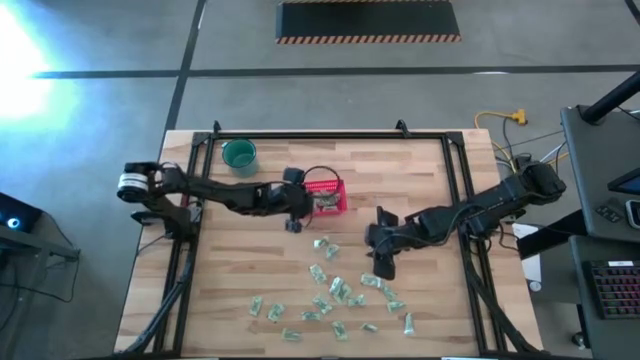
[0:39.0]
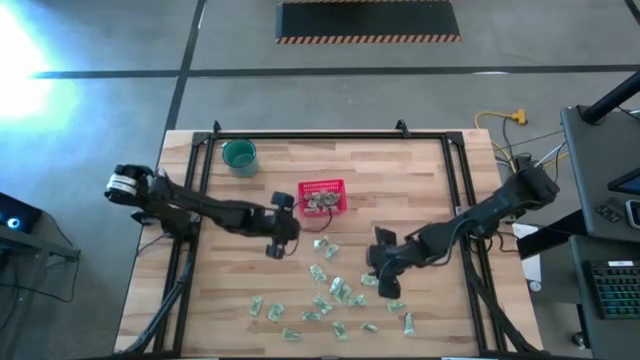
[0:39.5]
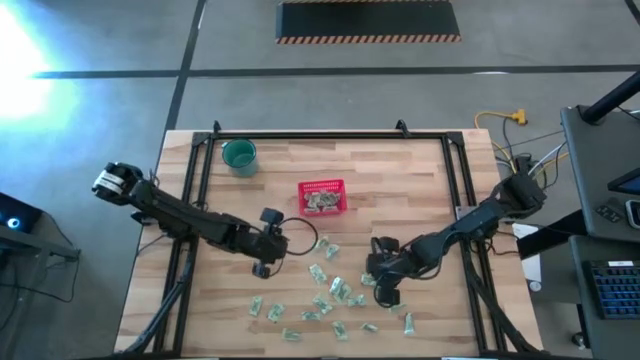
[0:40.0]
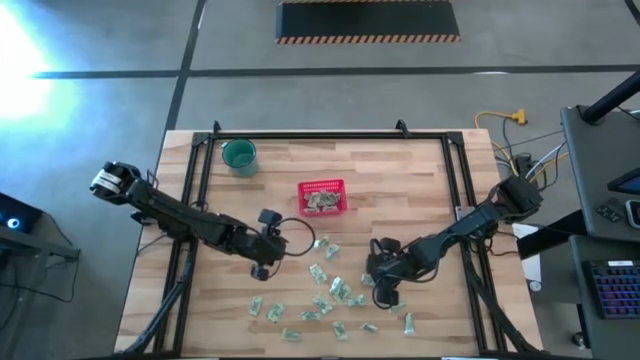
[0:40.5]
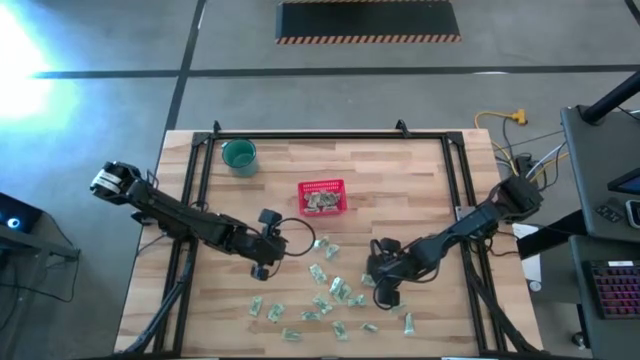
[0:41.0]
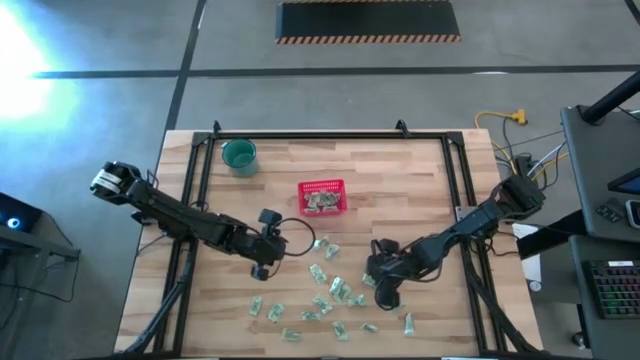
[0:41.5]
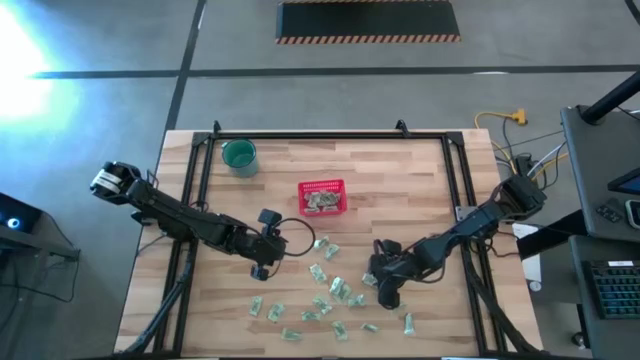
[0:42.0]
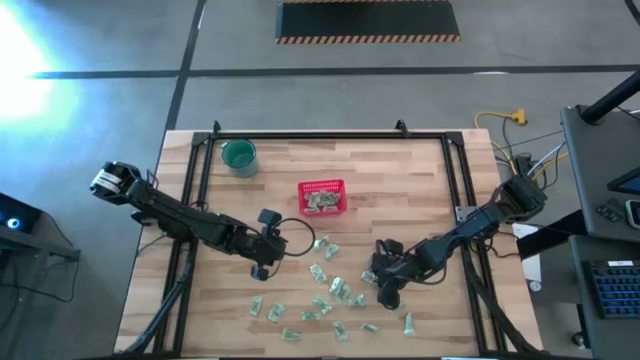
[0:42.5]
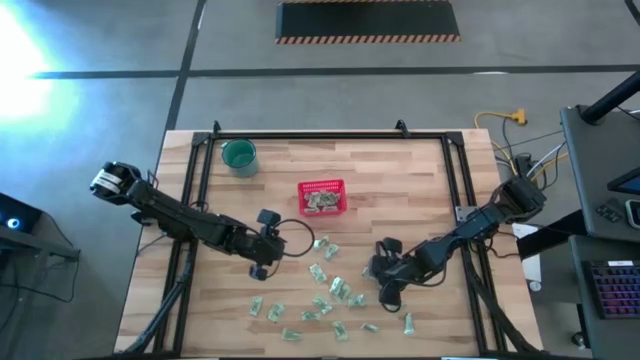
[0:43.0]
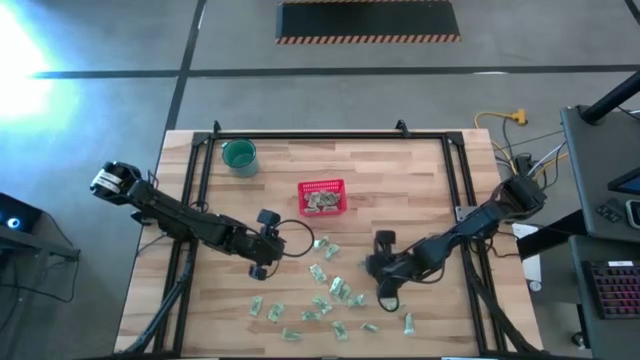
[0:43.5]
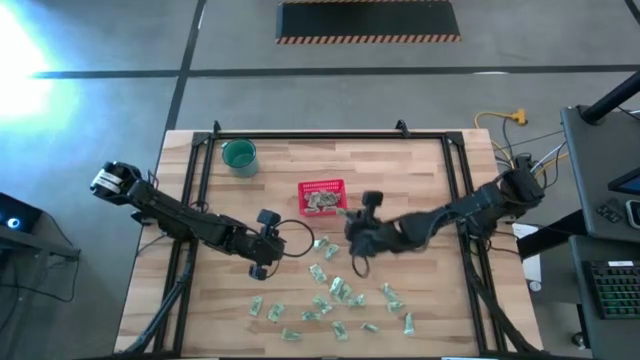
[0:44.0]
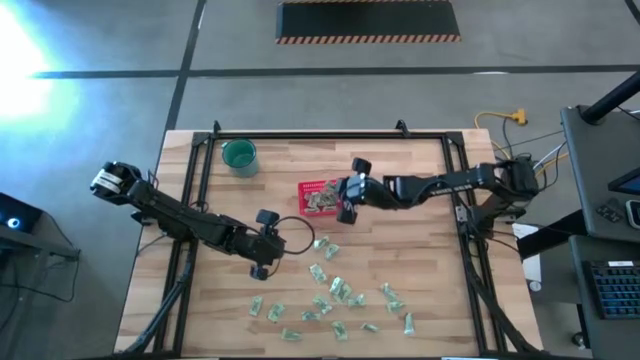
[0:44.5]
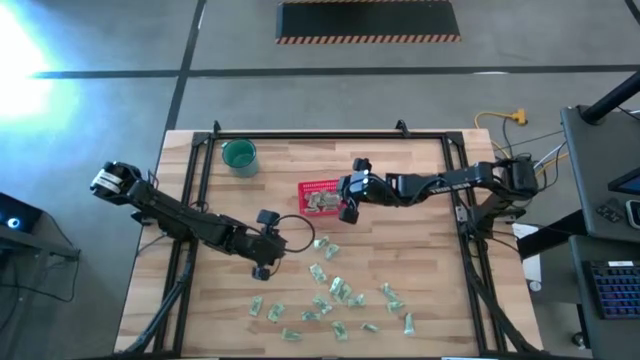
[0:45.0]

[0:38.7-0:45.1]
Task: Pick and place items into bin
Put the stevia packet into the red bin

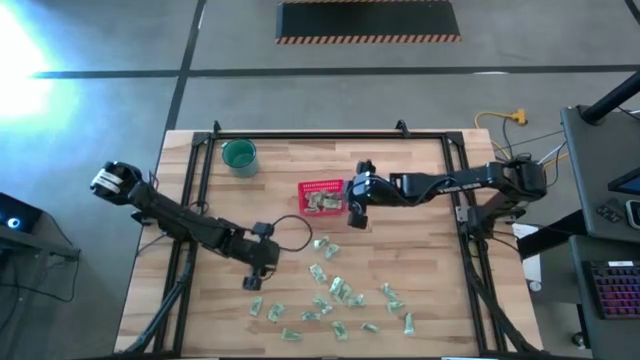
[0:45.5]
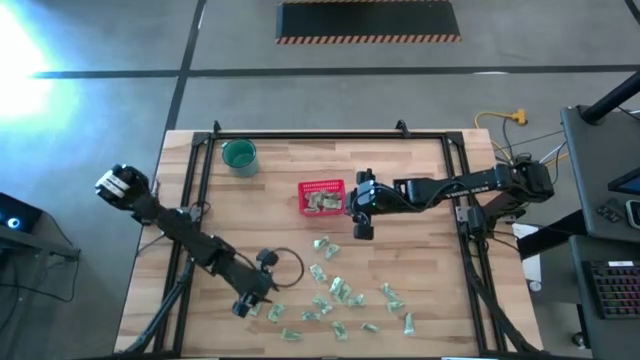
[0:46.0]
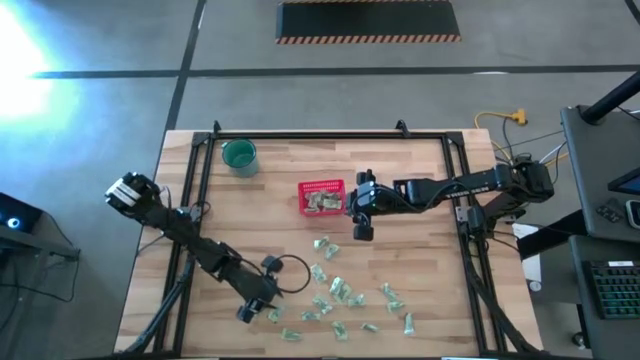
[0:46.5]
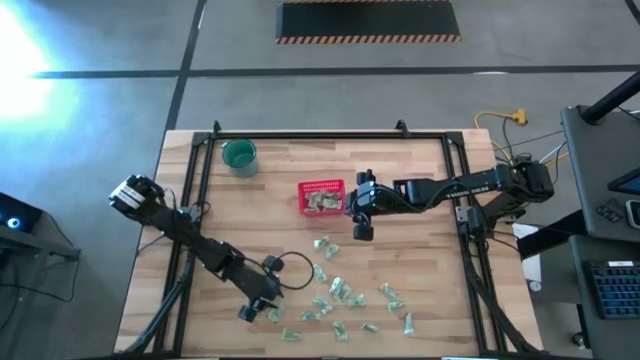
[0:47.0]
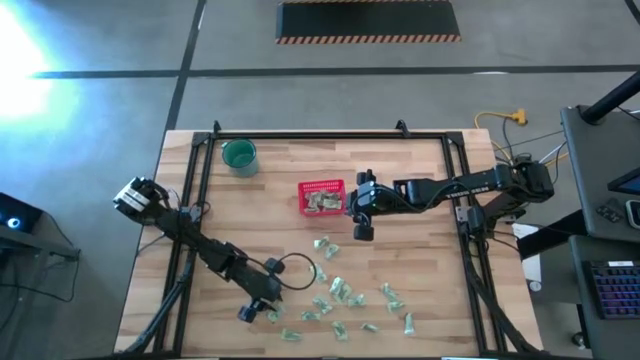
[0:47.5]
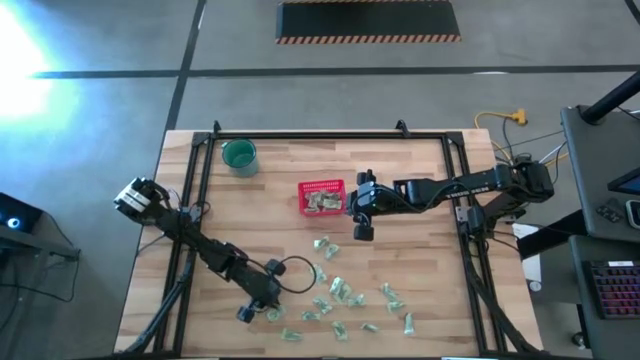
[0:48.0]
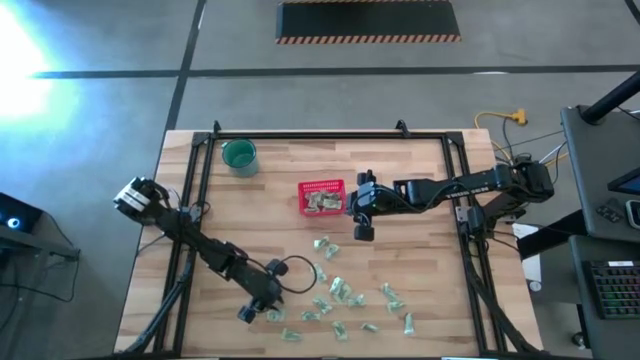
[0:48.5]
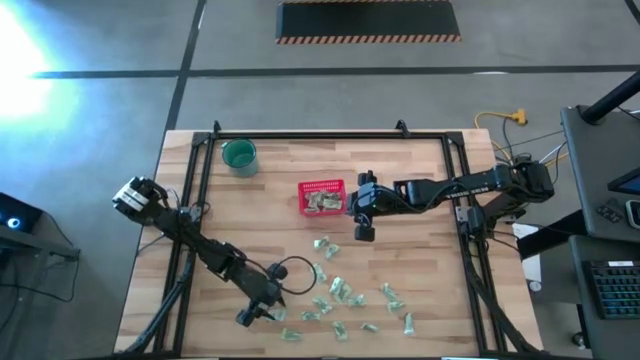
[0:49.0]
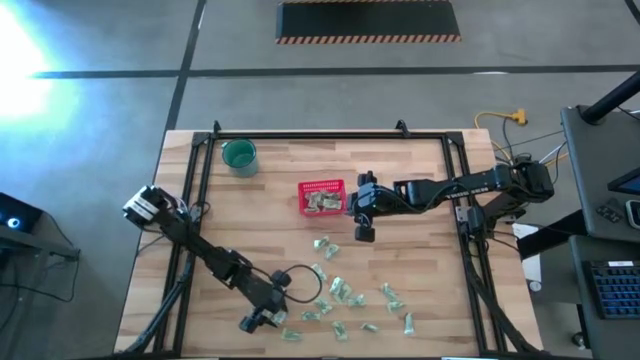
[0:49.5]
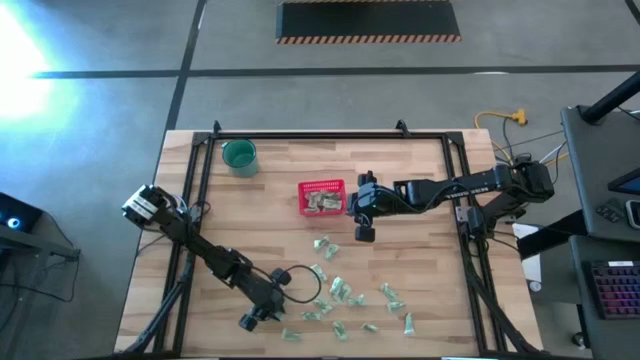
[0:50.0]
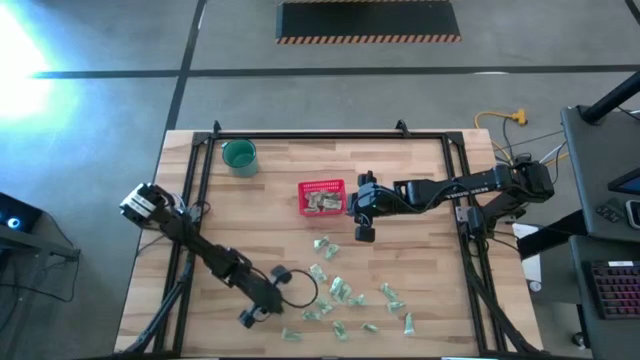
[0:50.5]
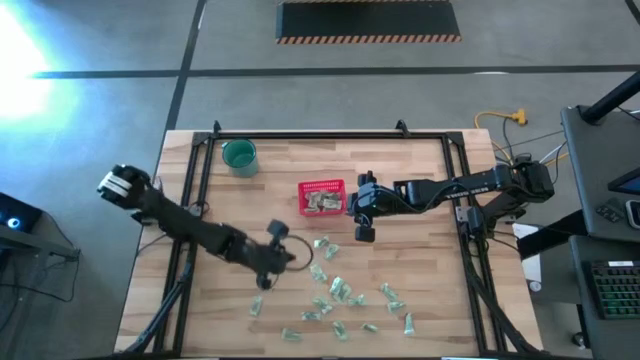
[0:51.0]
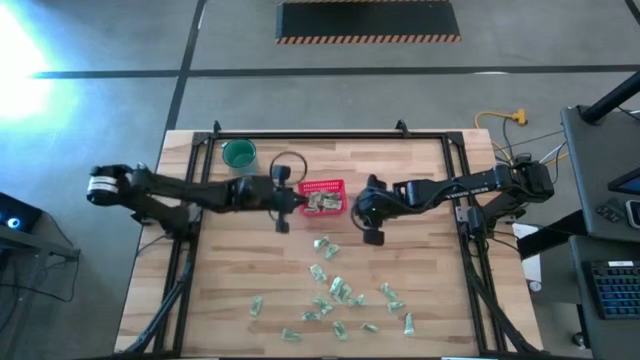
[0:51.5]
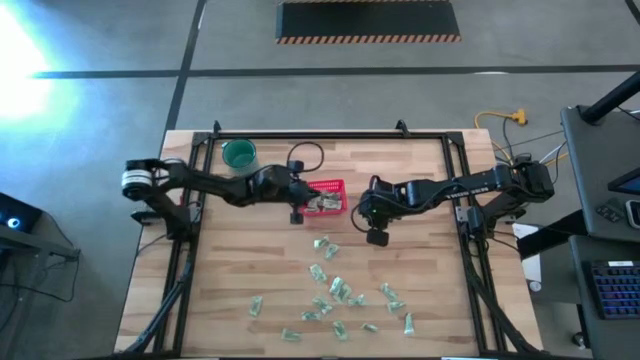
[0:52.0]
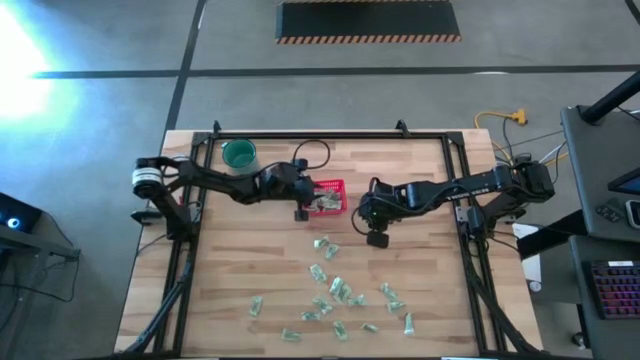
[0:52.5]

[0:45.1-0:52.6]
Put the stevia packet into the red bin

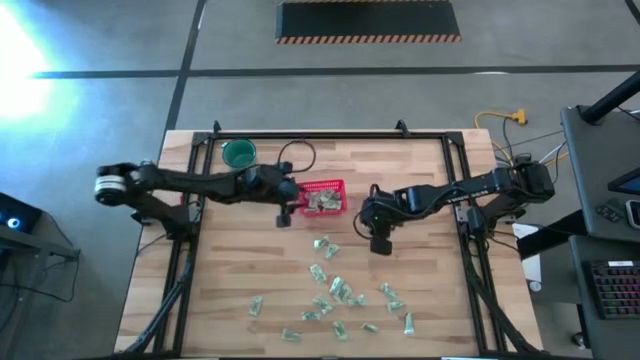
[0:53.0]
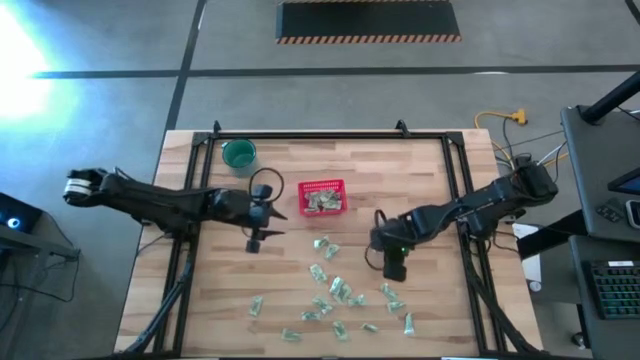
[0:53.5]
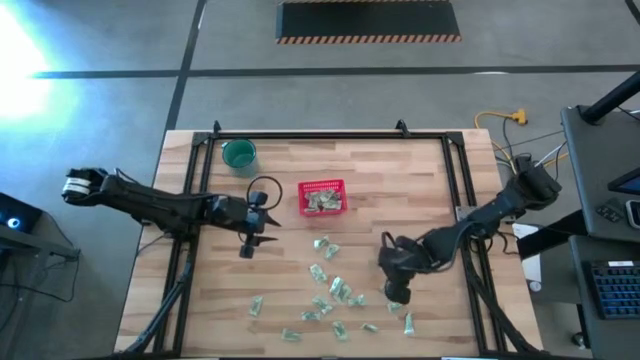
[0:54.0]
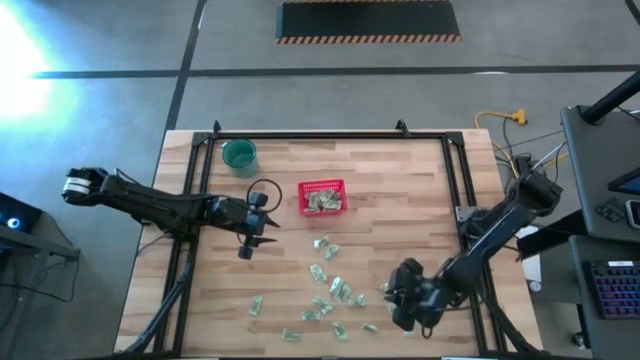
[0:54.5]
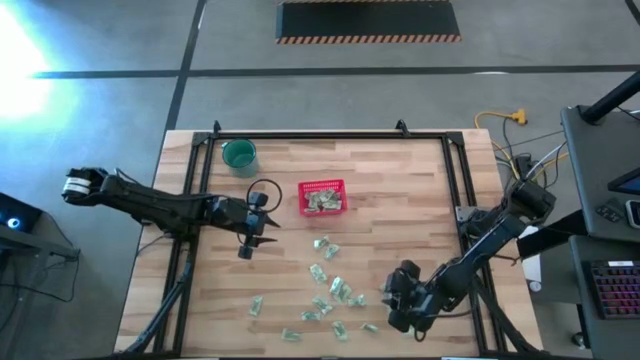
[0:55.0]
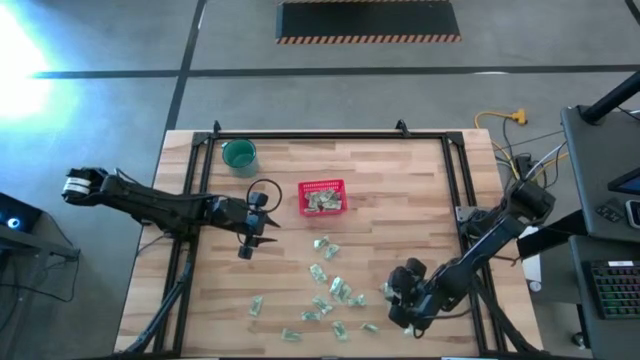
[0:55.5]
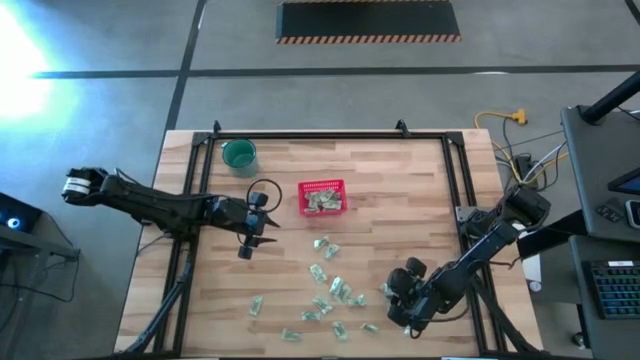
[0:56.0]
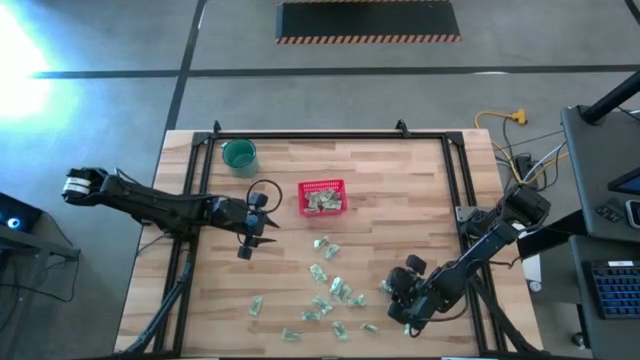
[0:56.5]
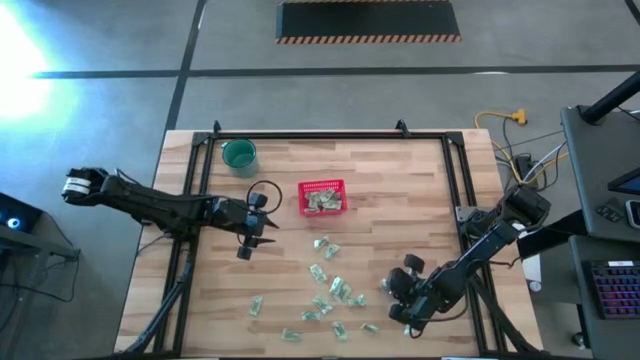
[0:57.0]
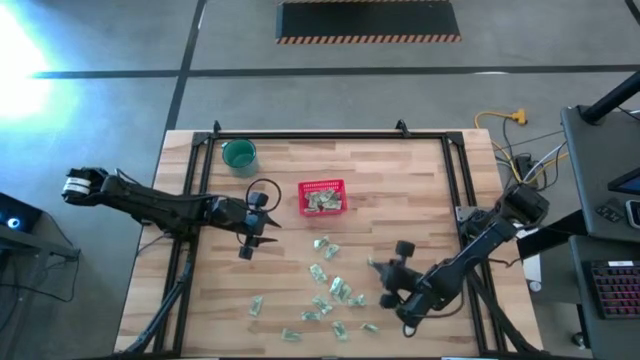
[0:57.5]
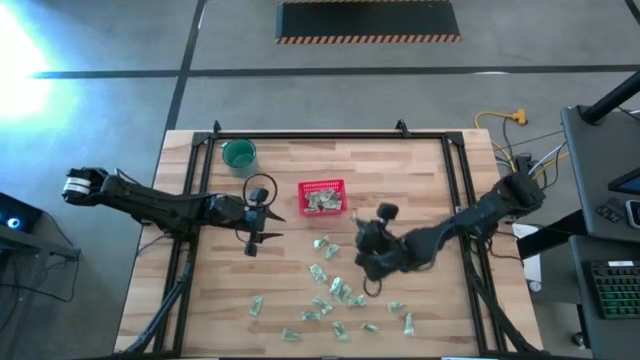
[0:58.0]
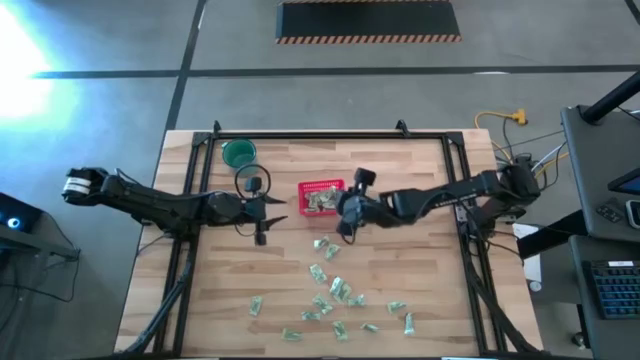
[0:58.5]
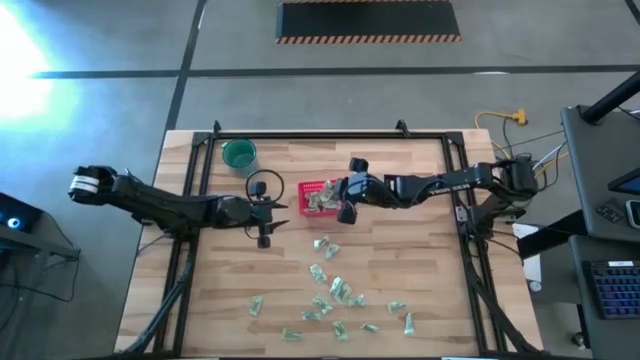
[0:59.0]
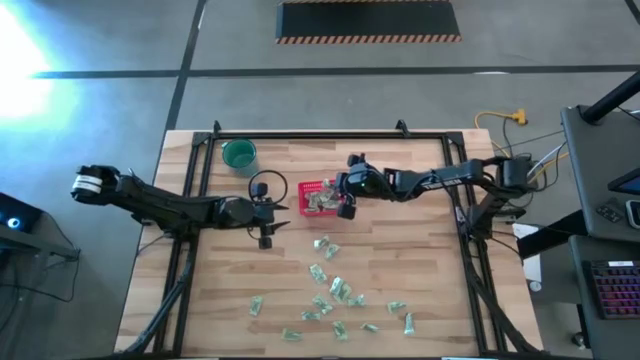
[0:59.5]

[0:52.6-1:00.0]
Put the stevia packet into the red bin

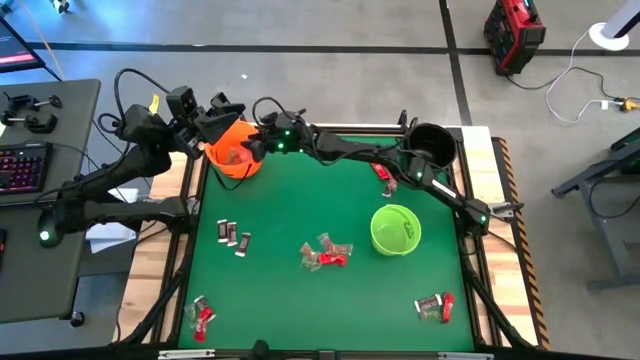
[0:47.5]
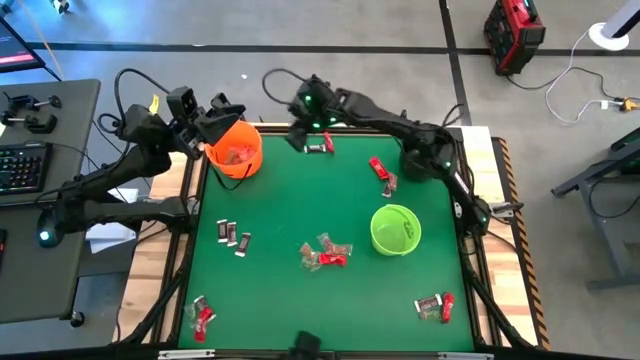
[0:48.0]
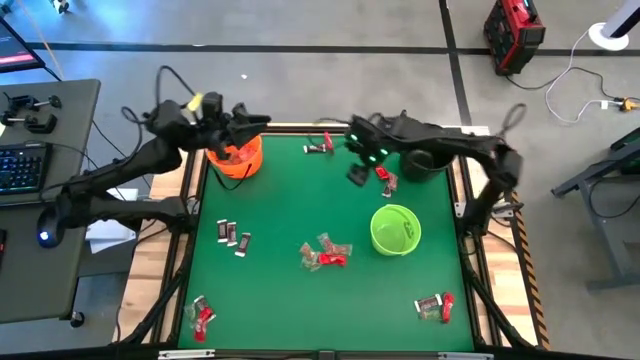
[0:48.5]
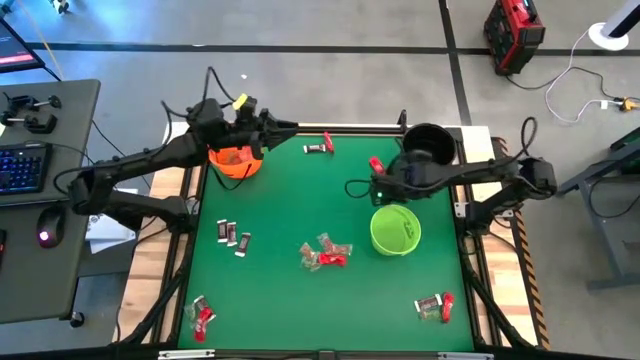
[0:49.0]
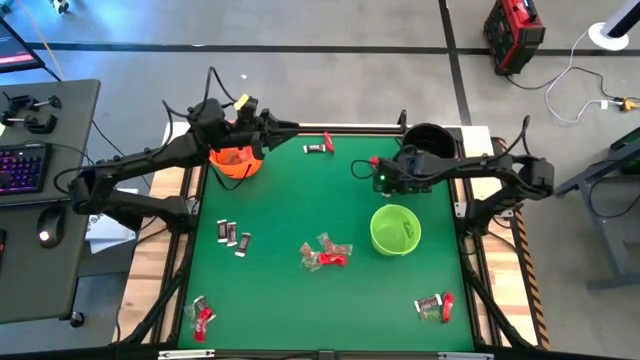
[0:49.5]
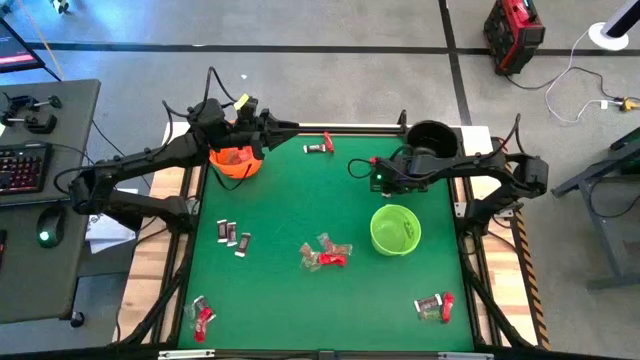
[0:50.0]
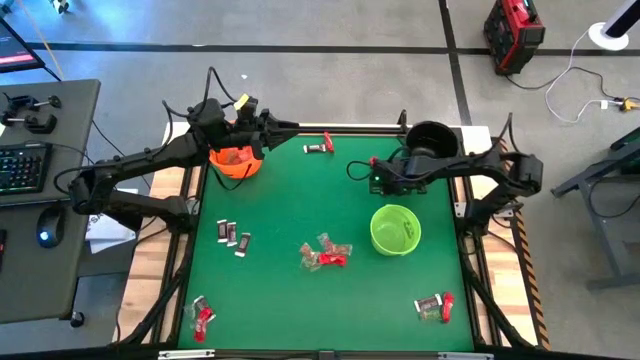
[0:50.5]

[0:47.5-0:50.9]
Task: Sort candy by brand, put in halloween buckets
Put the orange gummy into the orange bucket
